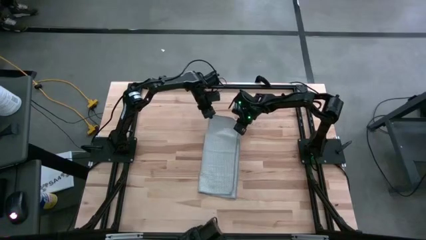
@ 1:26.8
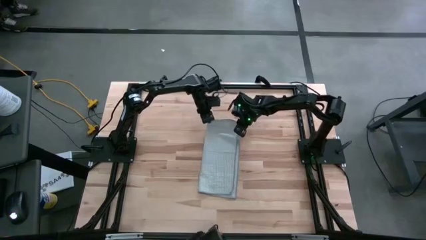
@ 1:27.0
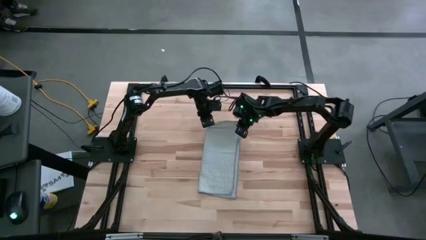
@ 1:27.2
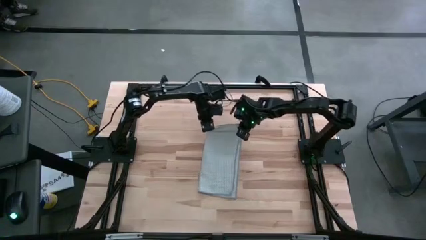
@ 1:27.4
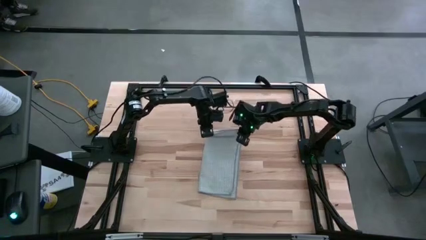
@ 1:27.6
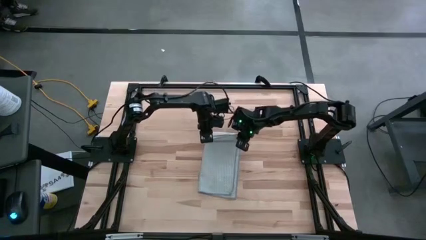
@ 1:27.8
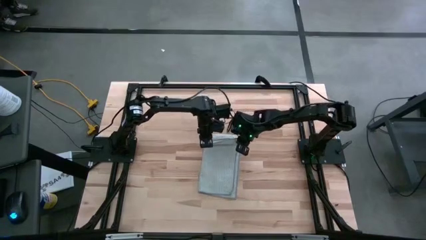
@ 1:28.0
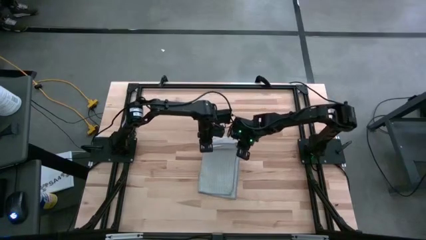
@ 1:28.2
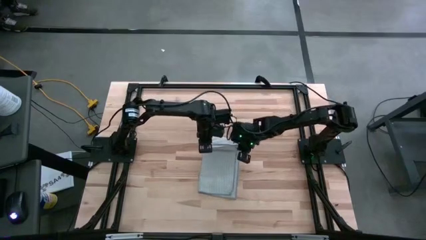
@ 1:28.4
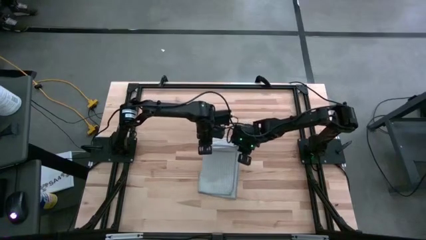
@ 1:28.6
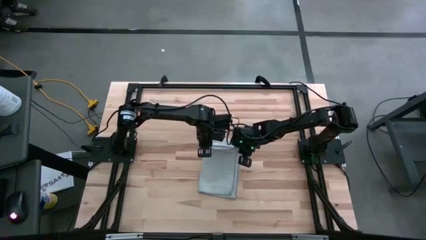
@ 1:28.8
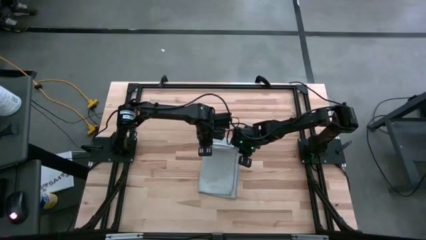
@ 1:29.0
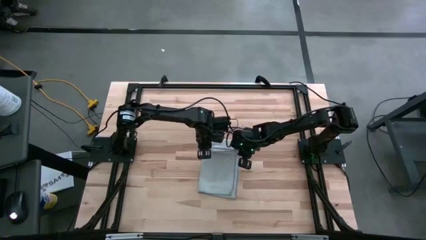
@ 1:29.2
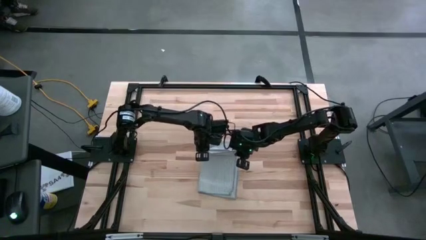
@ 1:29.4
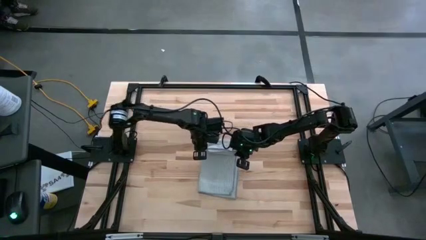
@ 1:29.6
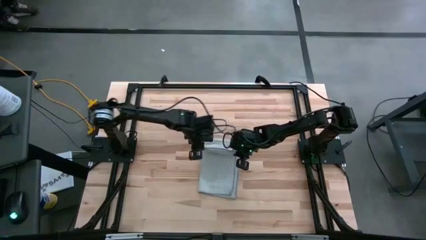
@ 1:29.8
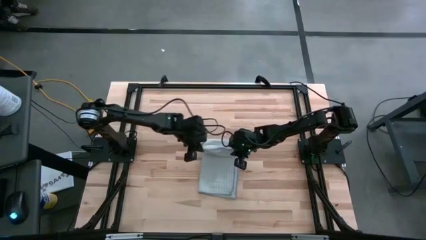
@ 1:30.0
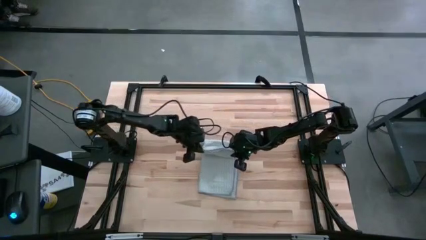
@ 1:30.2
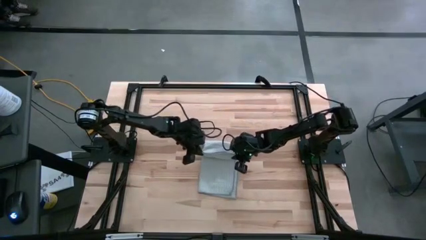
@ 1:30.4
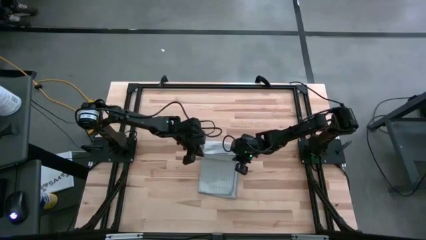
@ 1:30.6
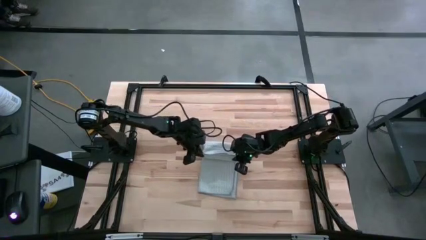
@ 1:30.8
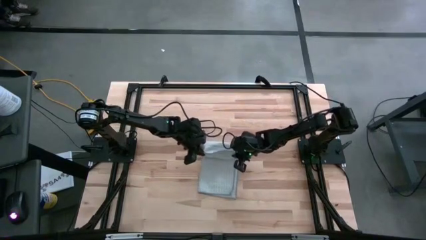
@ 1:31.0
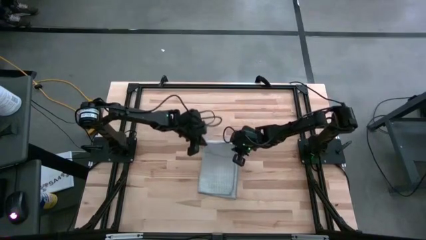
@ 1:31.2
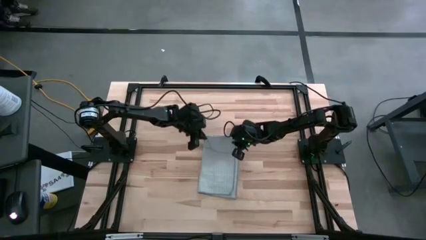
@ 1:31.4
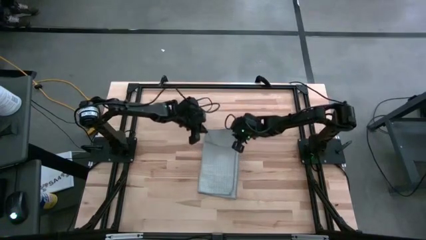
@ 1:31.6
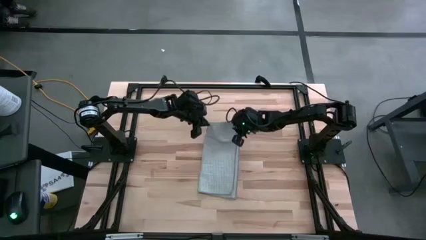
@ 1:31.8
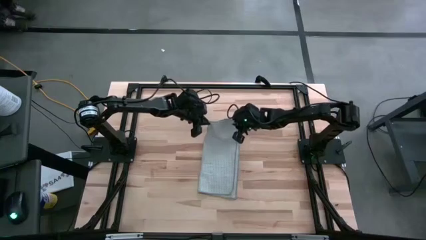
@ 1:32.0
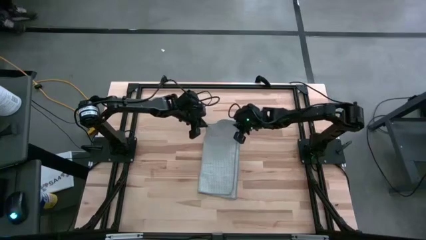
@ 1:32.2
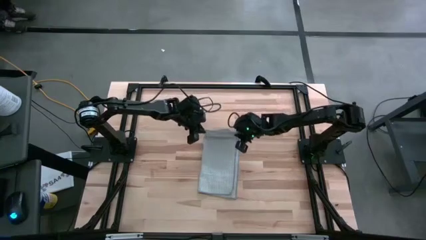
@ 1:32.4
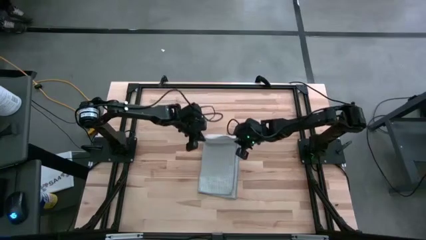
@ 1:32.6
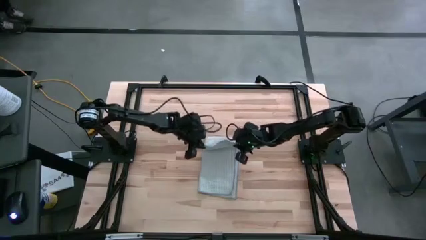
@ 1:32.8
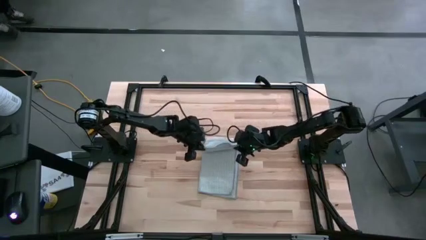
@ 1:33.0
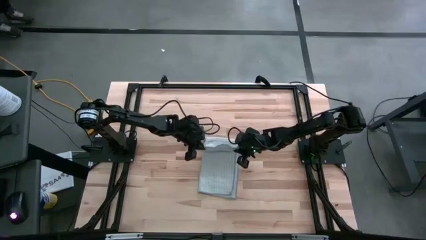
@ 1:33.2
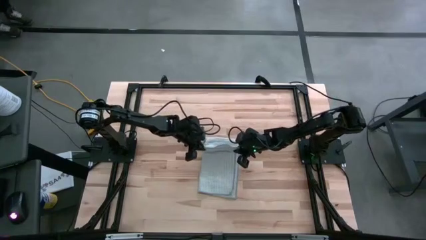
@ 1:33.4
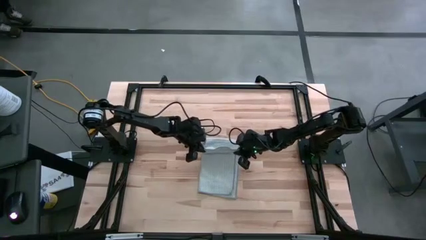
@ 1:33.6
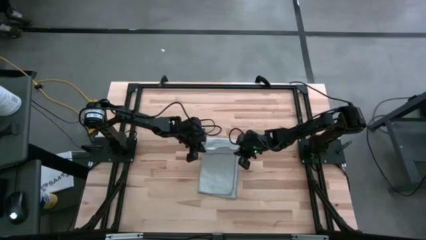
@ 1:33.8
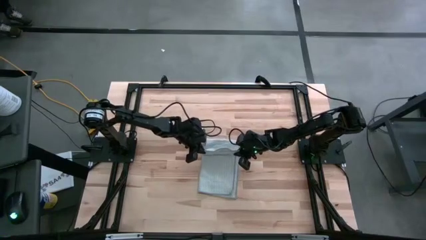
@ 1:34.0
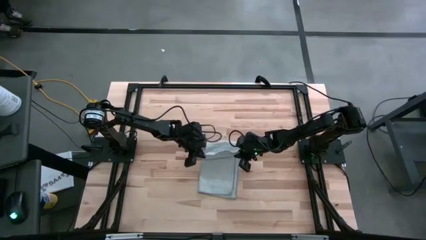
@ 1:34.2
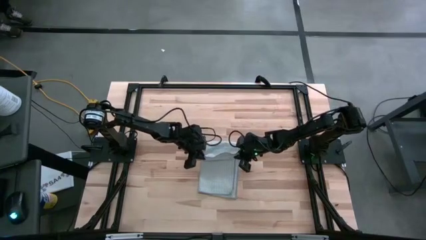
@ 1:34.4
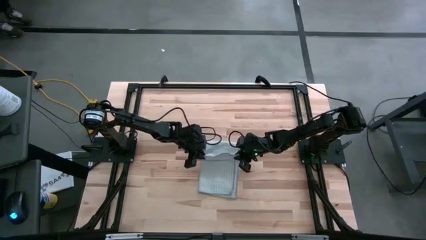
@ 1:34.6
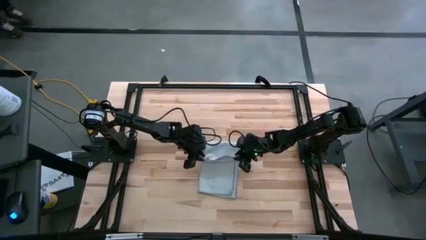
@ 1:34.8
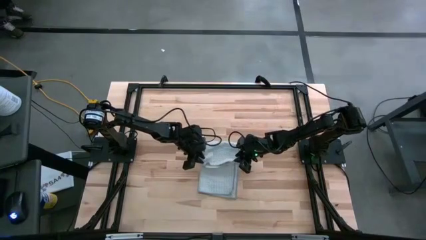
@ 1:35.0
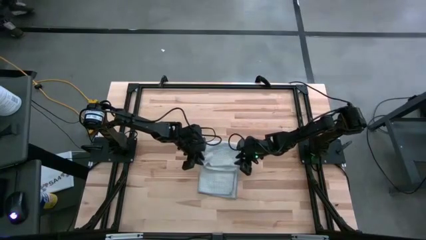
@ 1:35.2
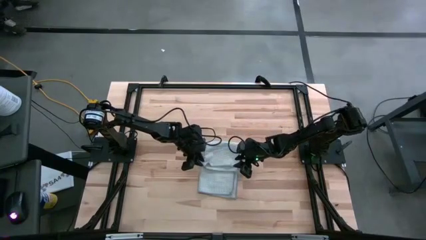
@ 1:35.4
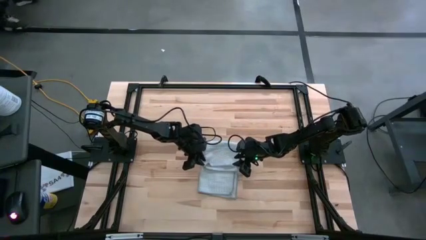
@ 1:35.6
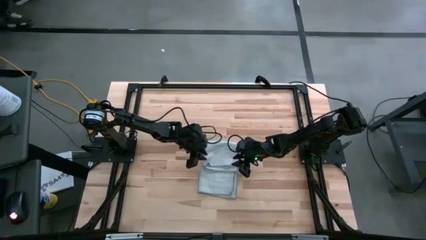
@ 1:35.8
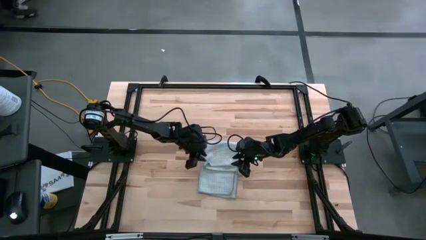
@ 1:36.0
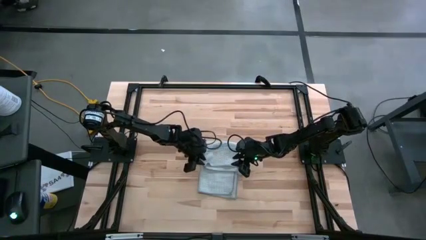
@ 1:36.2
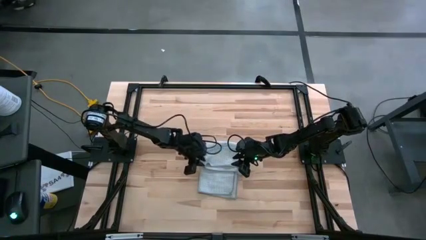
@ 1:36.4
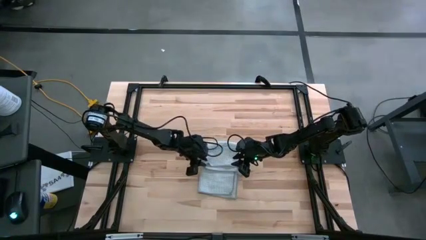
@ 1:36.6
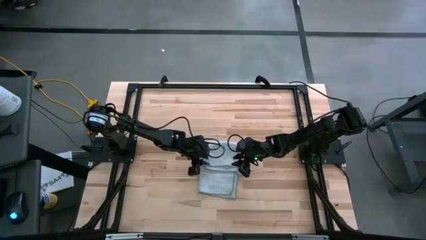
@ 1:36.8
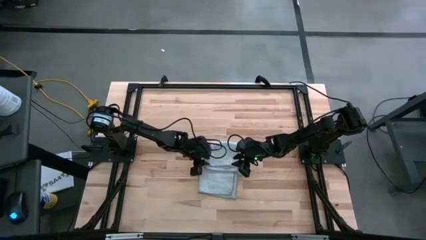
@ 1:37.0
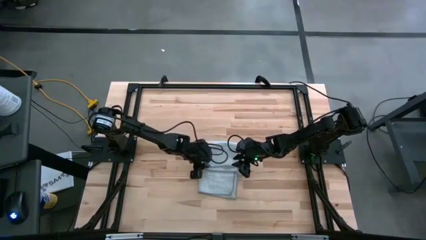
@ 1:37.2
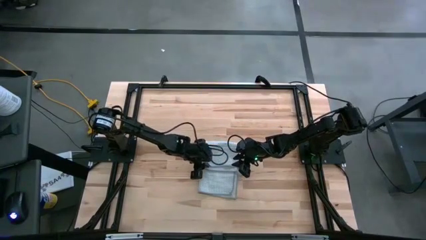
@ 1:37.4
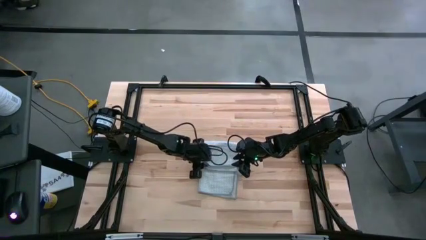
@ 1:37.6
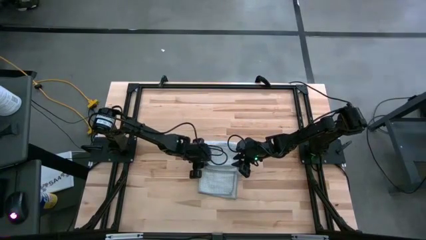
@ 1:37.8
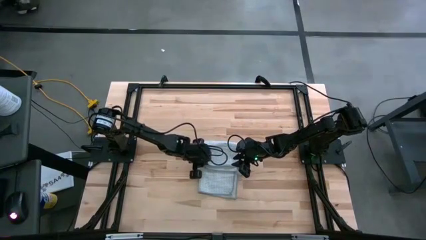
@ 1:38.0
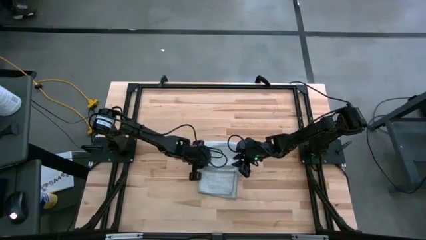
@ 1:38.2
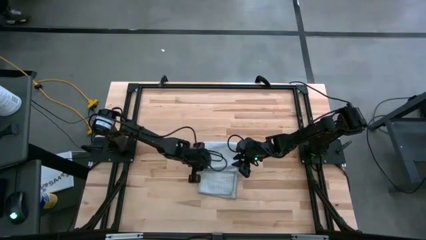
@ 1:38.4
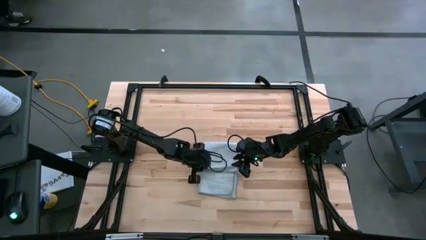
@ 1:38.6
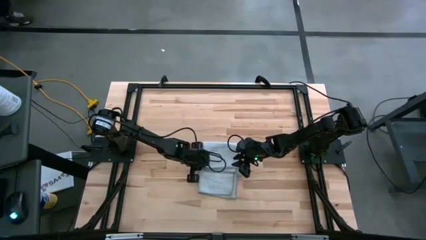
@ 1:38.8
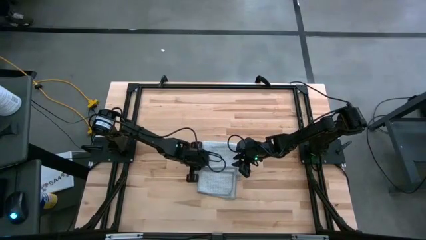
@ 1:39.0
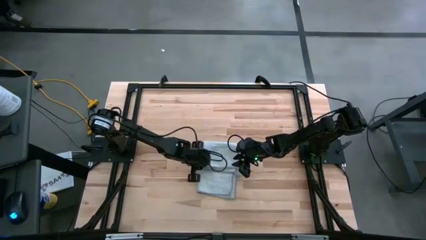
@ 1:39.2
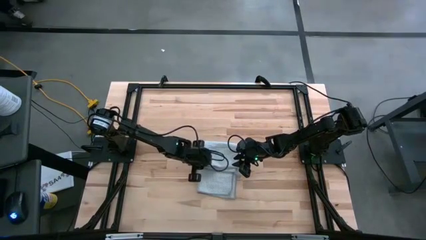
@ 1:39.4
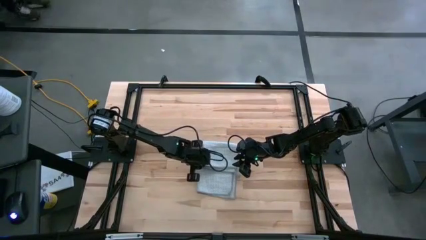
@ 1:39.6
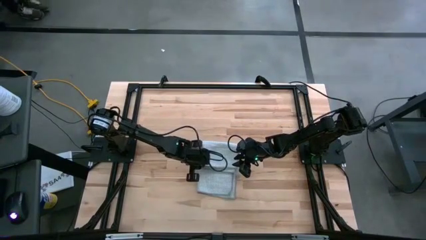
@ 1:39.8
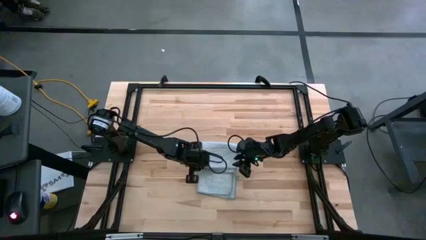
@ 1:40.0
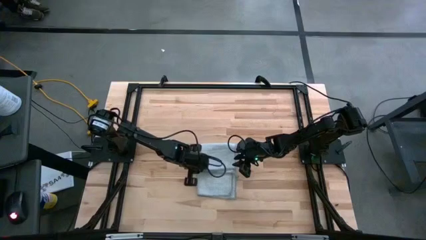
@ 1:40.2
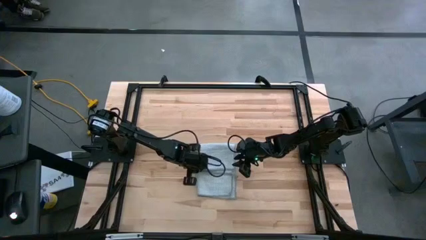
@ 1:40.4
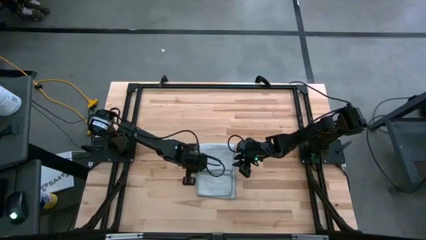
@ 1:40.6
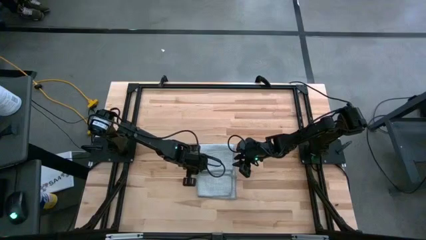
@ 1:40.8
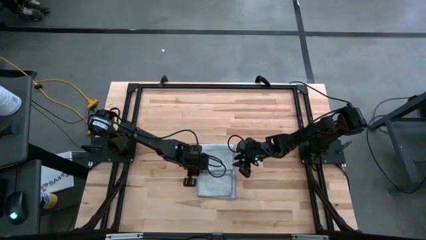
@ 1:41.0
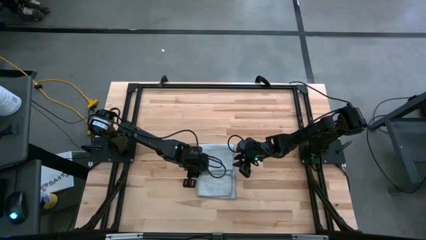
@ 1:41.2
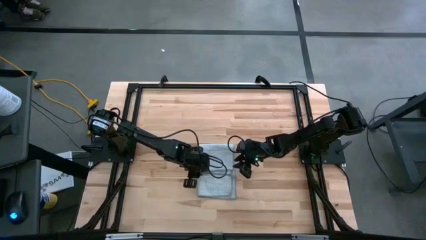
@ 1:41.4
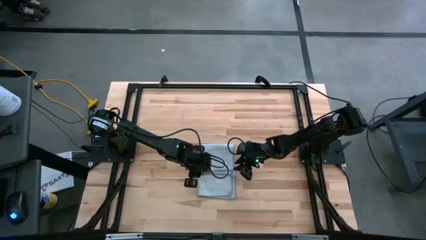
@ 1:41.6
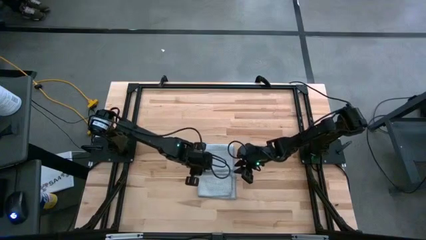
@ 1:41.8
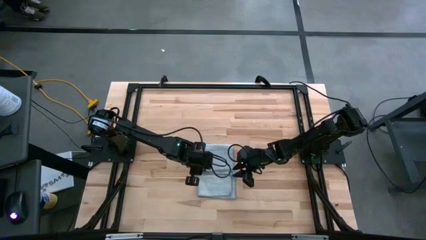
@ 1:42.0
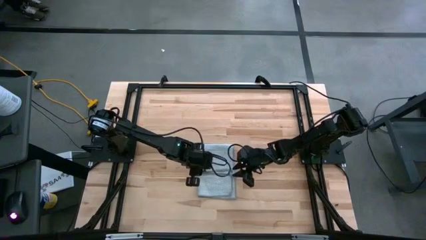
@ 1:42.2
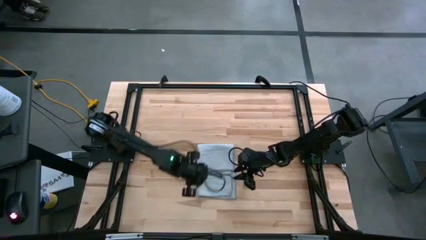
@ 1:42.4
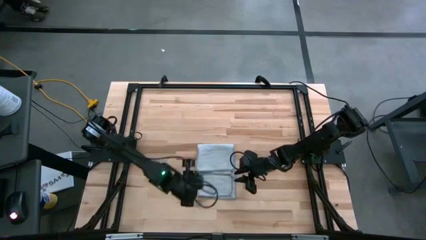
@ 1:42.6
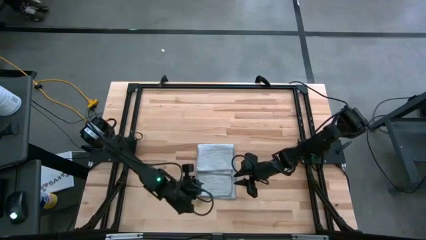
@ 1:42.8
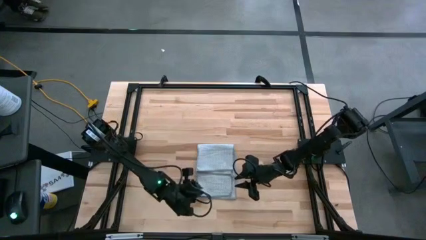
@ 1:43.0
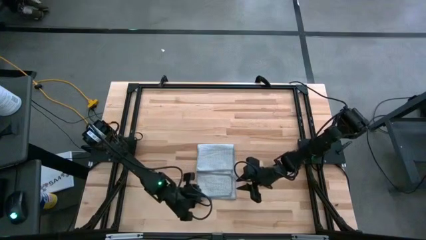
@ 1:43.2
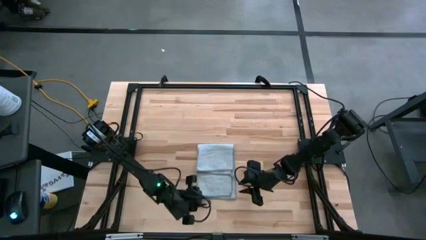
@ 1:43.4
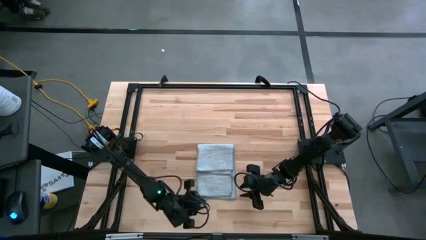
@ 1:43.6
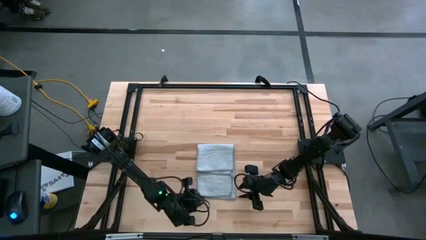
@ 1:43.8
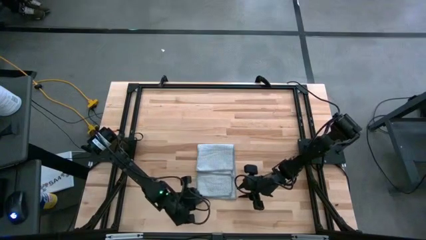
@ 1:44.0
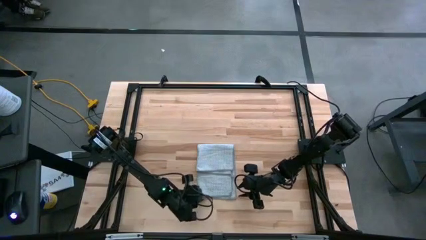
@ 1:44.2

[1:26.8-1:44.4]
Task: Fold microfiber towels
Fold the gray microfiber towel
